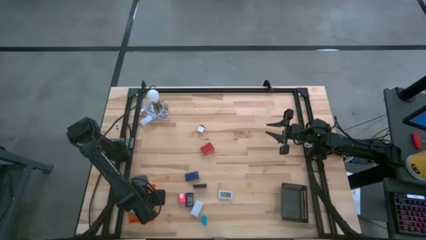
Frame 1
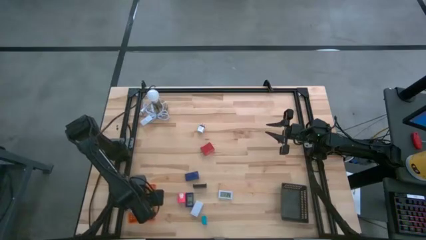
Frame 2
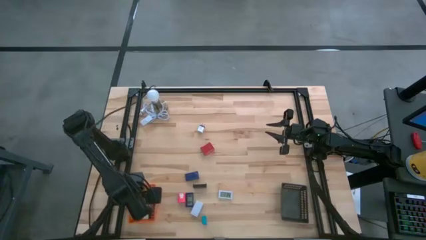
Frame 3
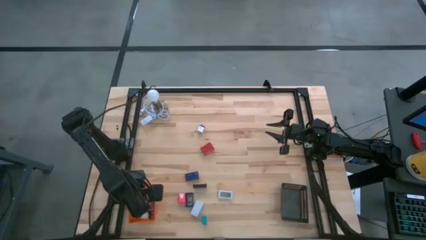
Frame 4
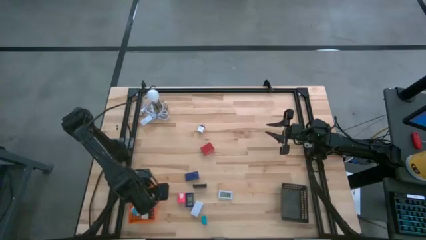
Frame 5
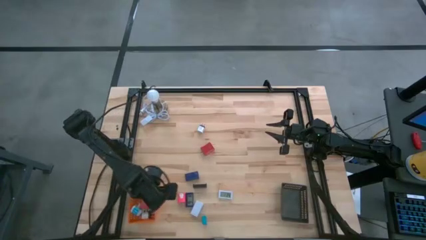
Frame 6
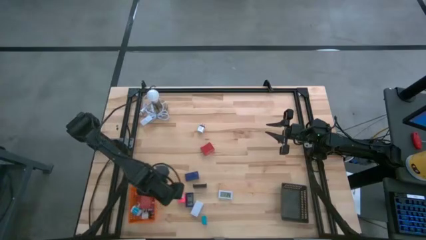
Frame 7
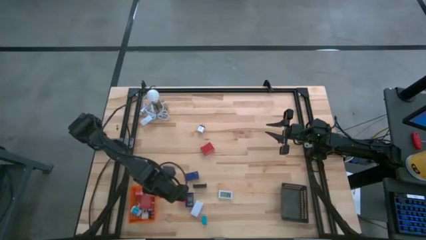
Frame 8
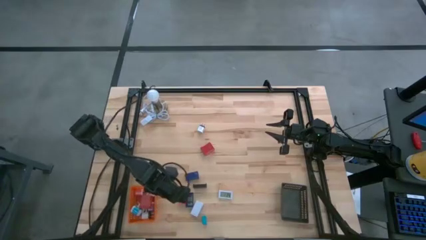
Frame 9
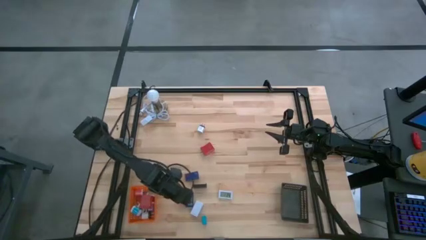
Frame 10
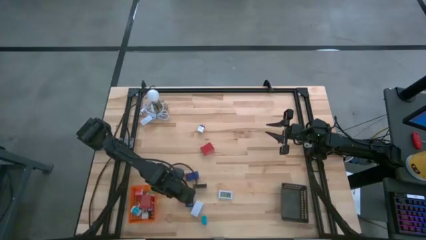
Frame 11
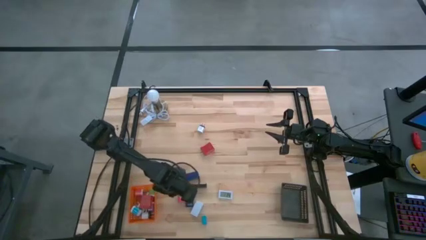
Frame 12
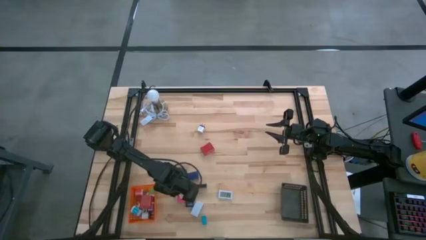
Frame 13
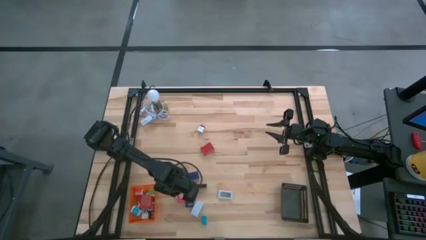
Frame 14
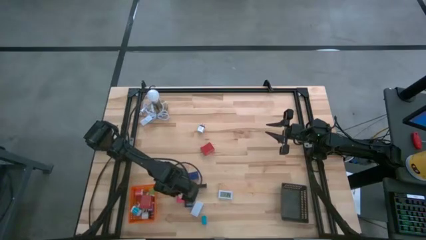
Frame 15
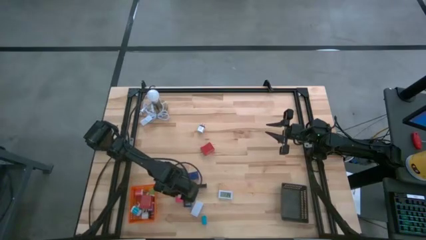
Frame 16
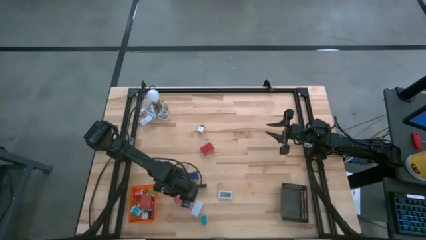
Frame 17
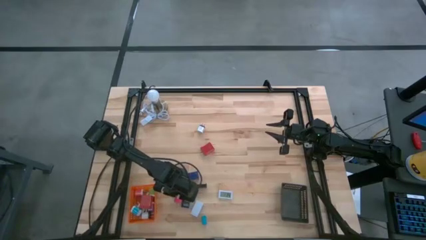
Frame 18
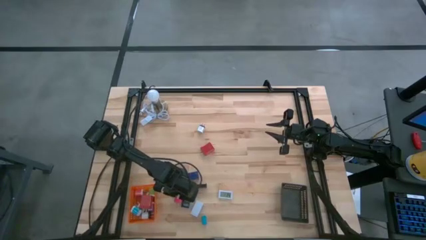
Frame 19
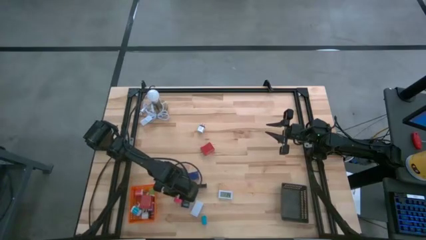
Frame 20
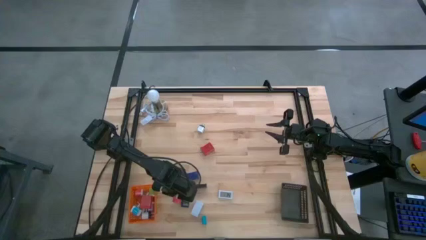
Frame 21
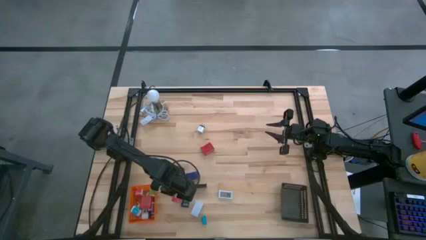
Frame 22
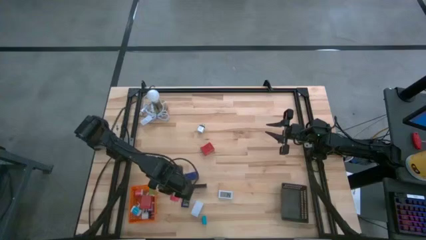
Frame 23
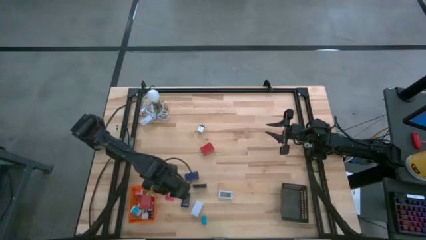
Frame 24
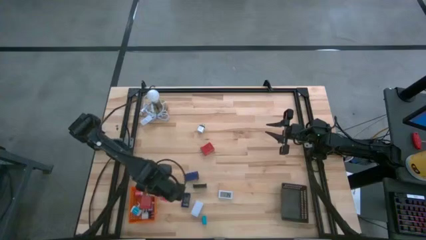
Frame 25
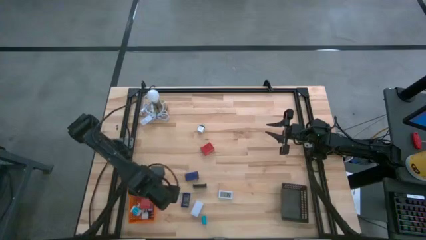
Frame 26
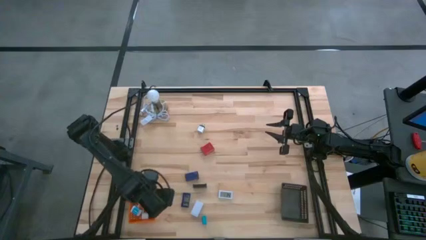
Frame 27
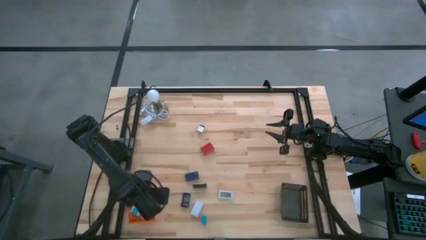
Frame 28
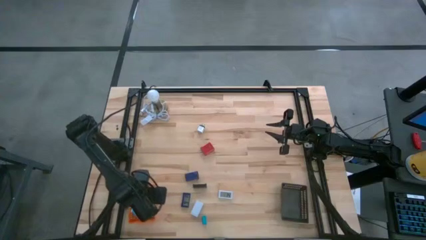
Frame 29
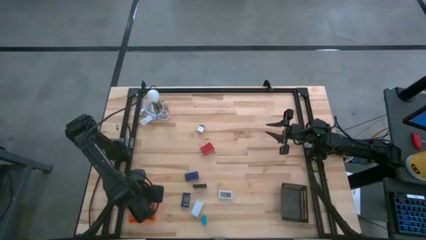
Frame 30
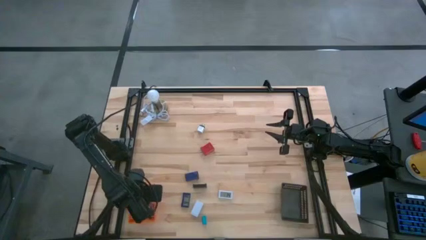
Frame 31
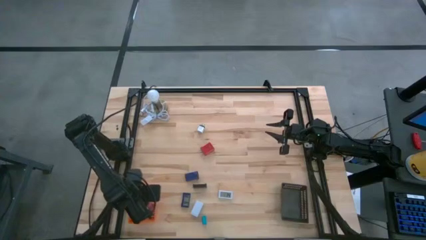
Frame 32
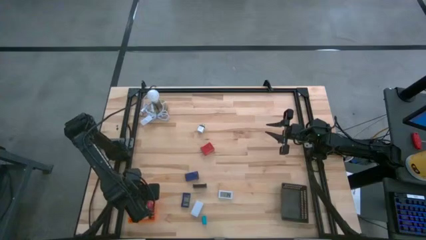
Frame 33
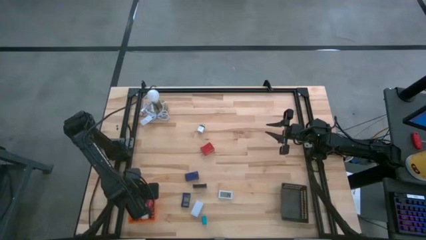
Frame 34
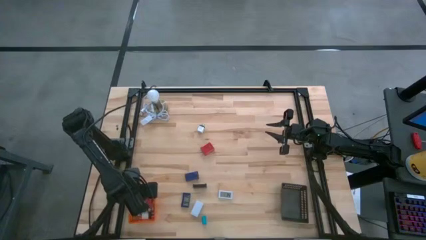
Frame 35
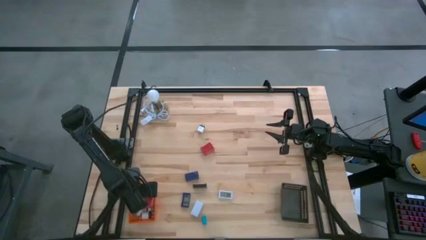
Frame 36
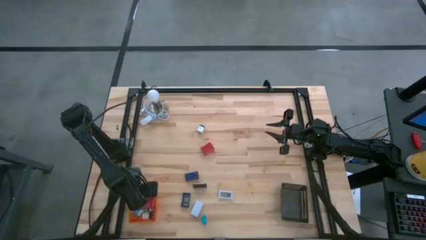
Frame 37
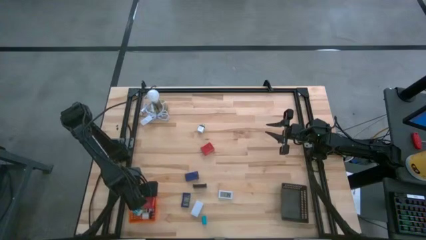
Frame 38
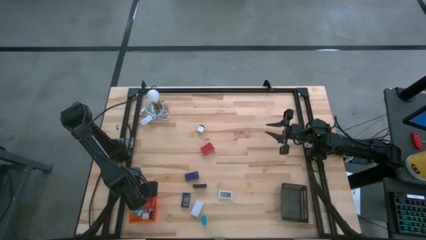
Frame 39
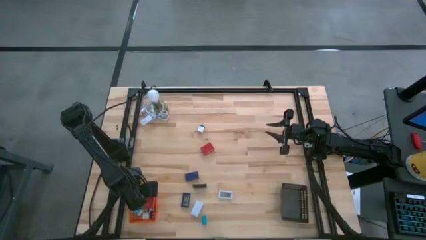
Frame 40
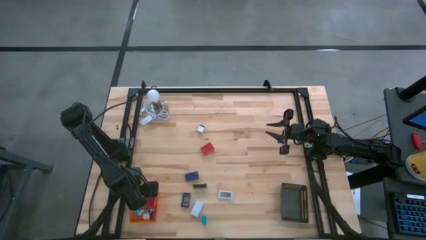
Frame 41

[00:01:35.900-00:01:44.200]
Task: Pick & Place Office items
Put the pink charger adapter into the orange bin

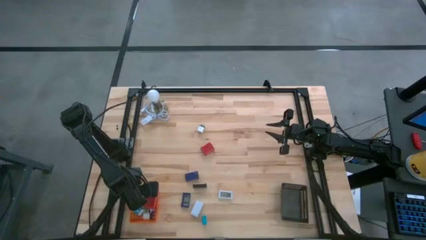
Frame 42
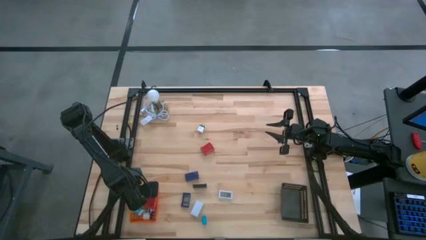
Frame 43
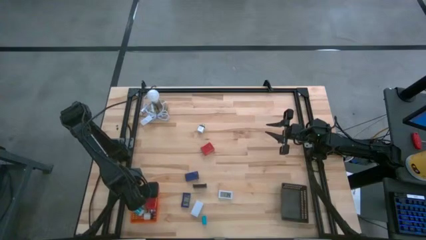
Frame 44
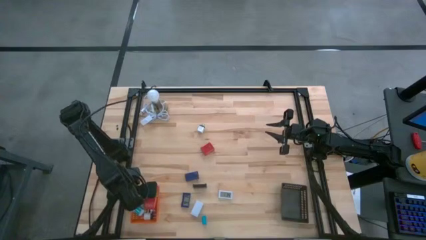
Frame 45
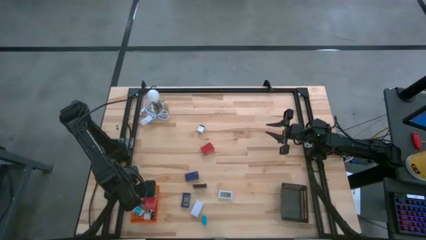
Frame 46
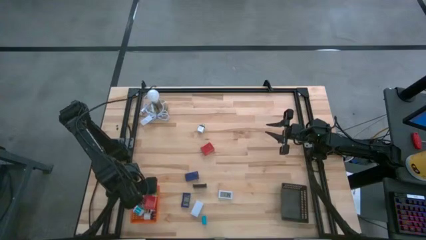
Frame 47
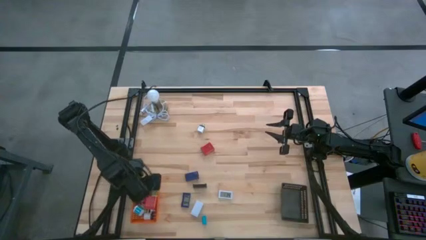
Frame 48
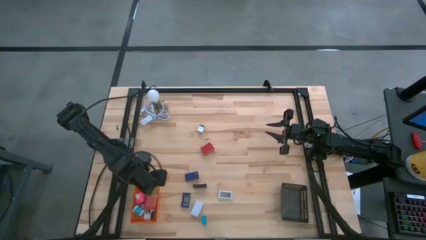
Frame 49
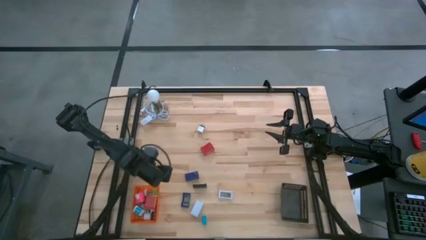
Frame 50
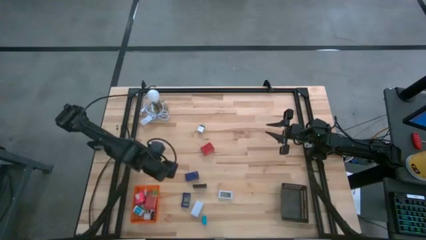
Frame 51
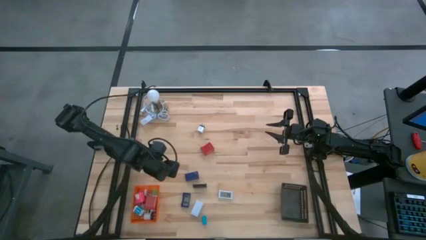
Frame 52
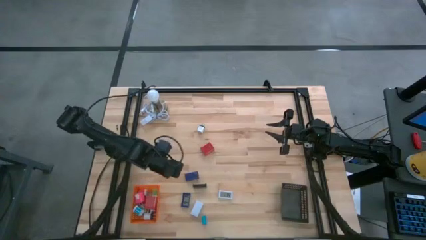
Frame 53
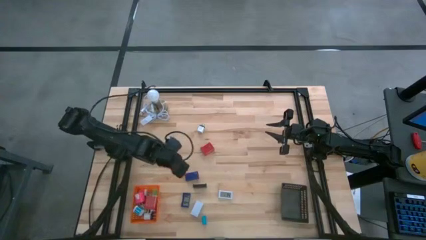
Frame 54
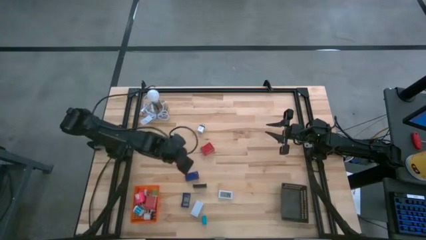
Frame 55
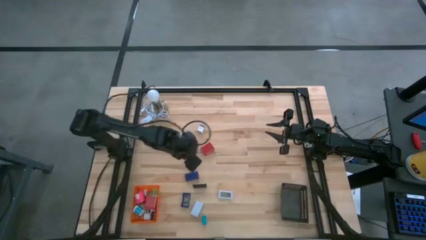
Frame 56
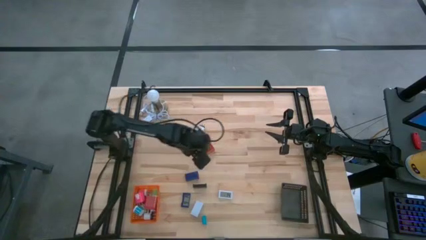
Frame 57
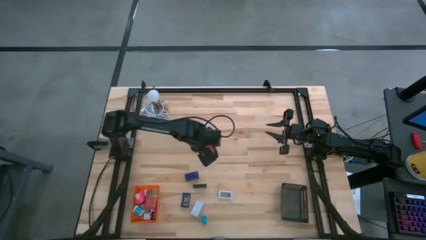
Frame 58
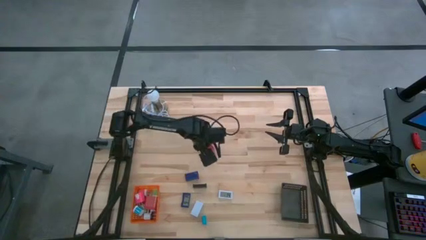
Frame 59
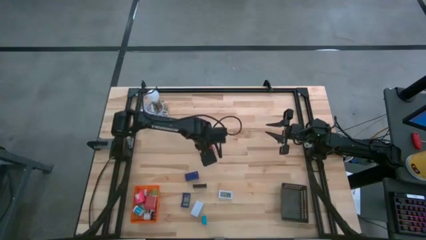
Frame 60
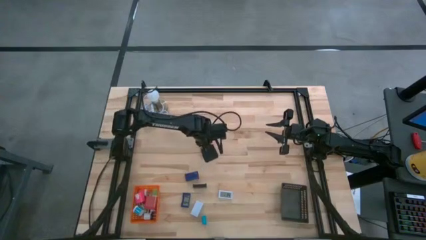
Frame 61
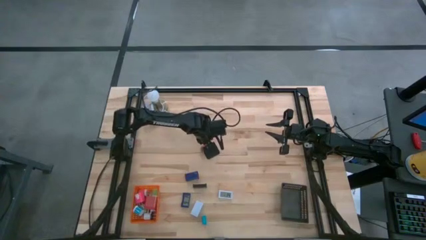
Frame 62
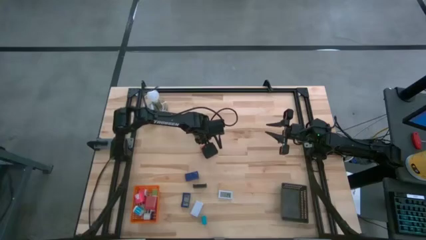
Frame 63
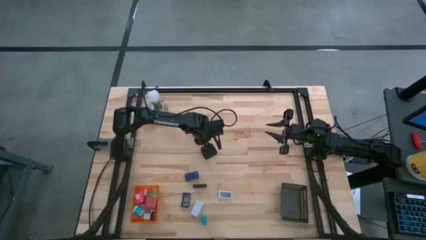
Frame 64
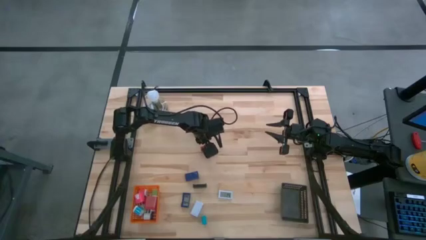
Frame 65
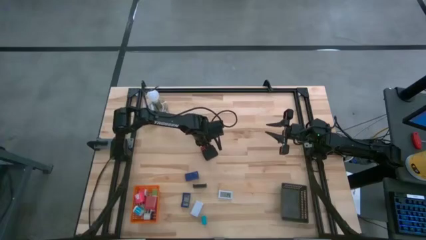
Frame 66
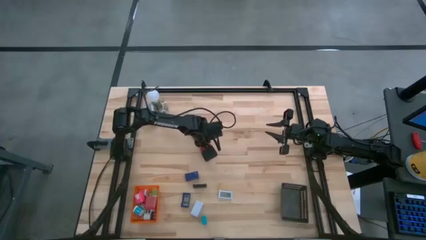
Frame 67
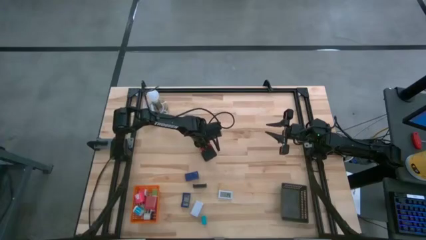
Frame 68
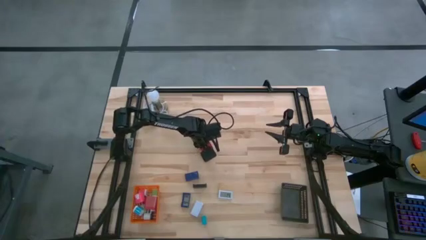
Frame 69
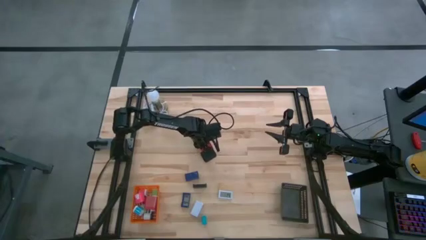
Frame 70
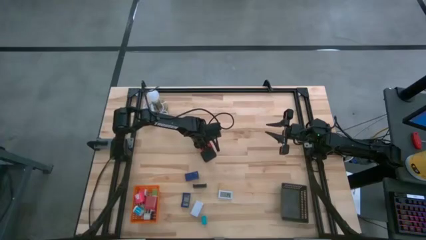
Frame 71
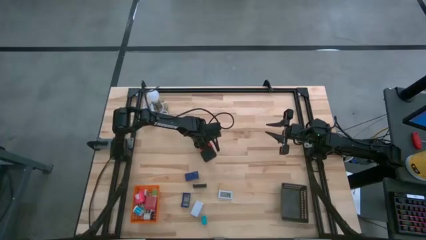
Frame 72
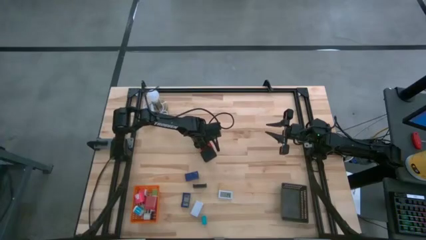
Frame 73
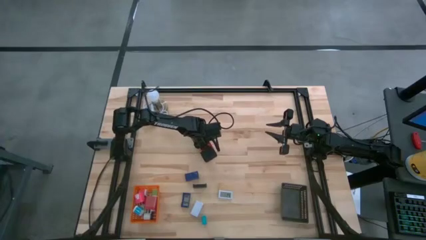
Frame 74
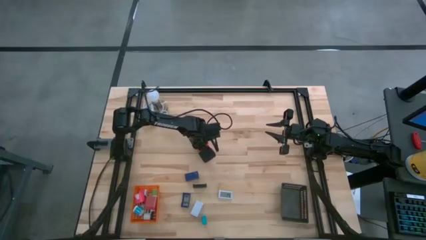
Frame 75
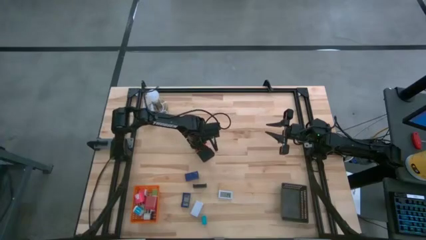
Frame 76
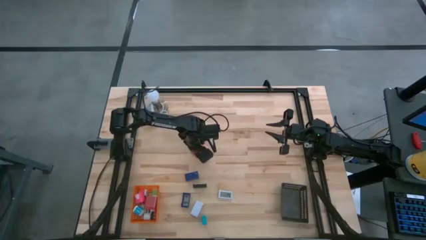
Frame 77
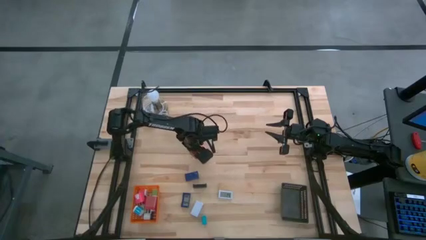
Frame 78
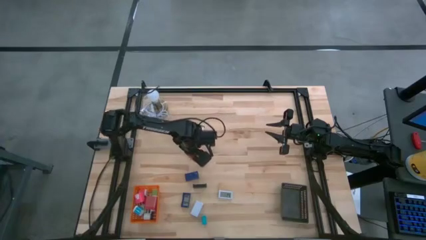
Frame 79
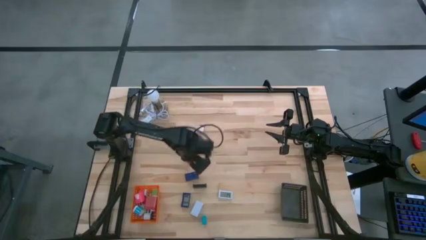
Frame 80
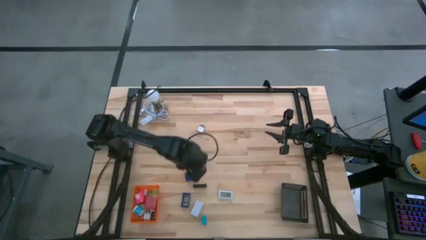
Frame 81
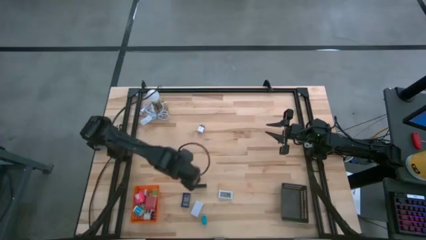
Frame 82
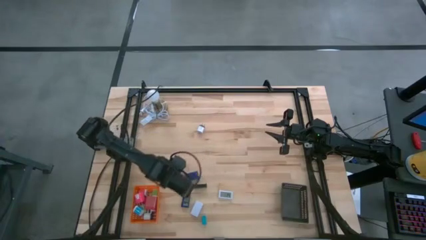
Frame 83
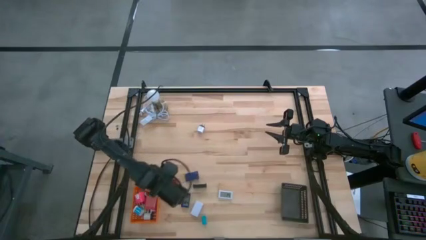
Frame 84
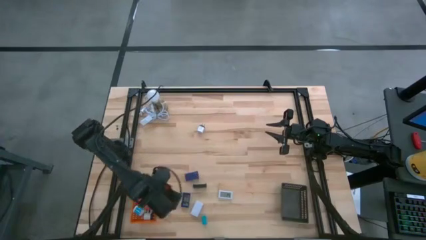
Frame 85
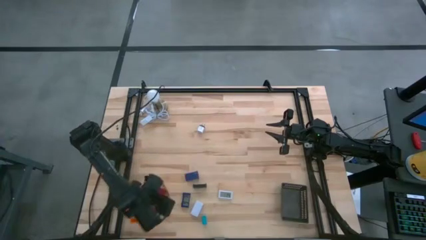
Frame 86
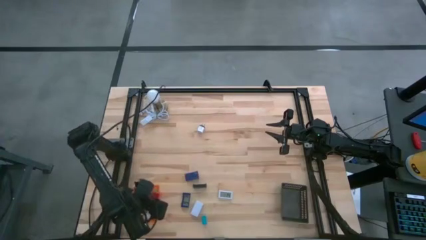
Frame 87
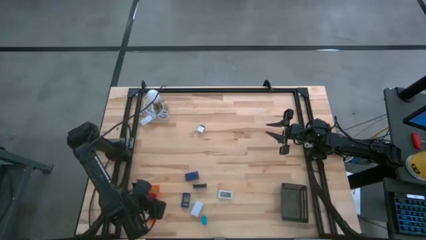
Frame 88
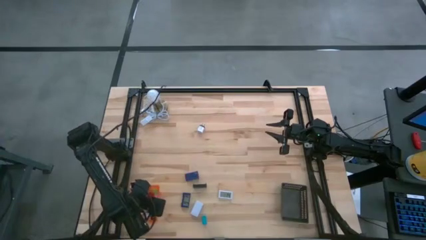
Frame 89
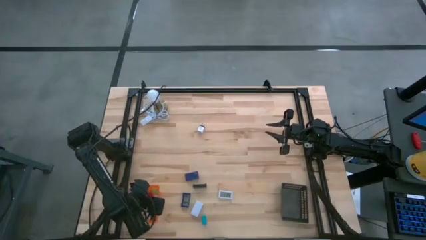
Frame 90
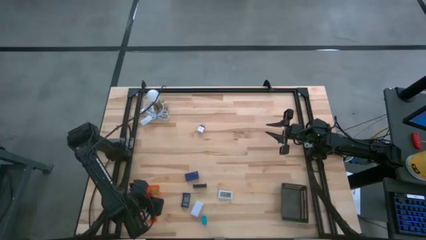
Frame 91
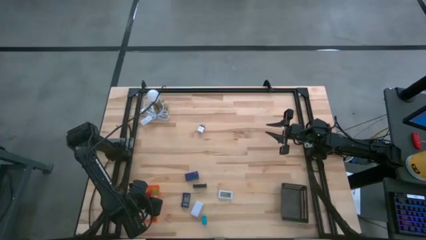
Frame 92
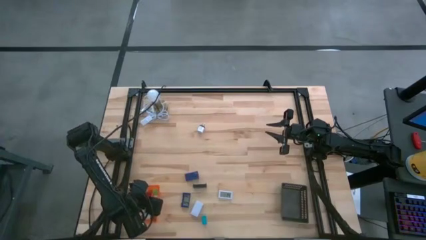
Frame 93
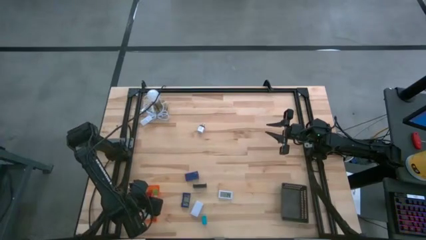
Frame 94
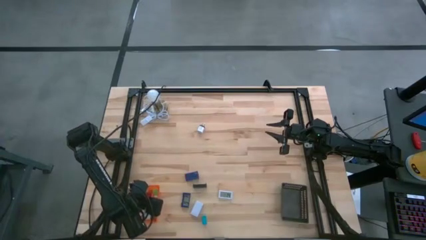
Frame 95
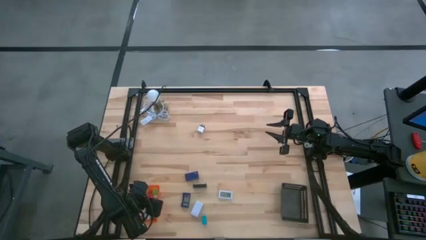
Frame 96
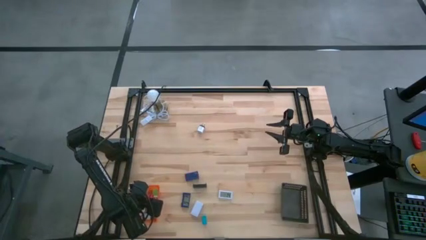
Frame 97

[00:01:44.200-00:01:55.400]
Put the red charger adapter into the orange bin
